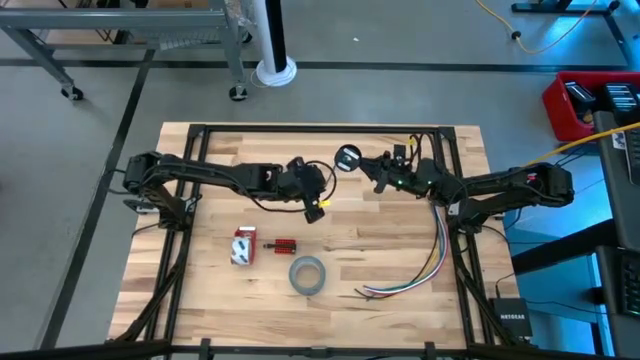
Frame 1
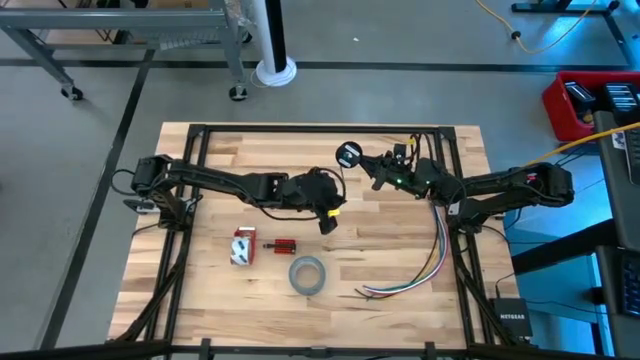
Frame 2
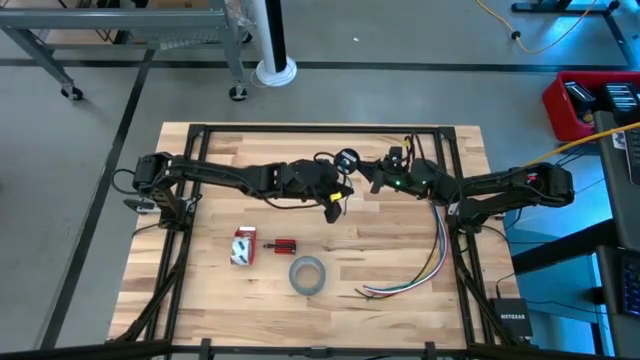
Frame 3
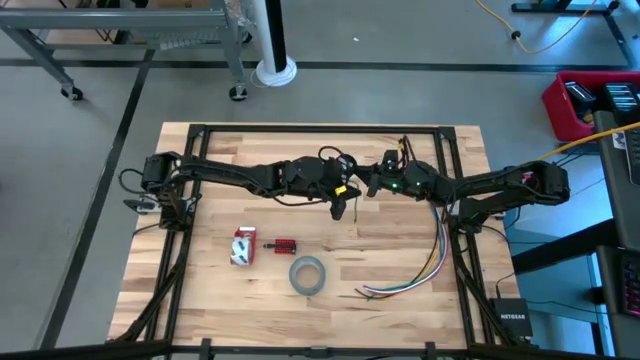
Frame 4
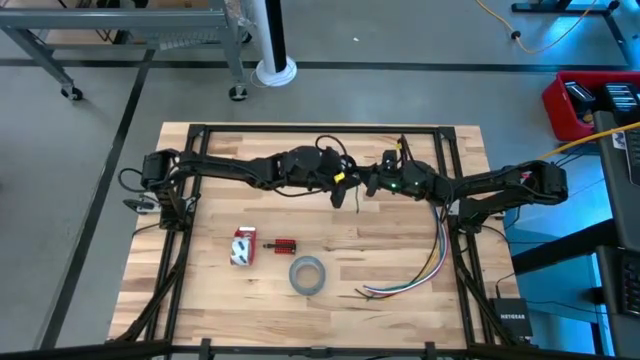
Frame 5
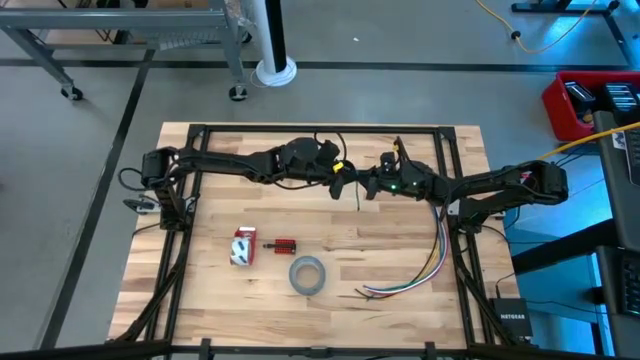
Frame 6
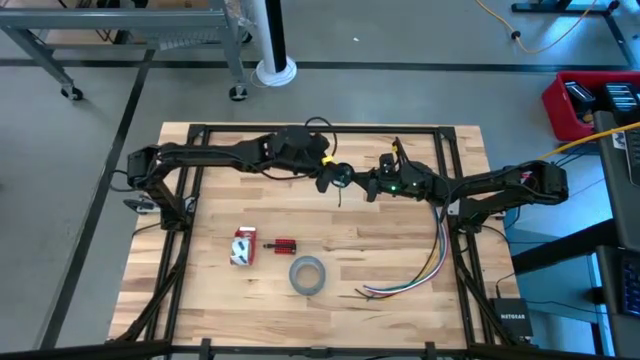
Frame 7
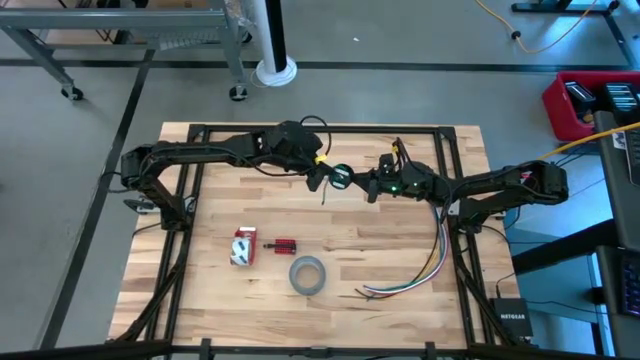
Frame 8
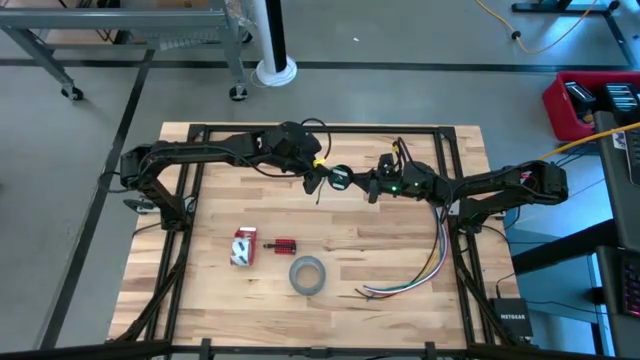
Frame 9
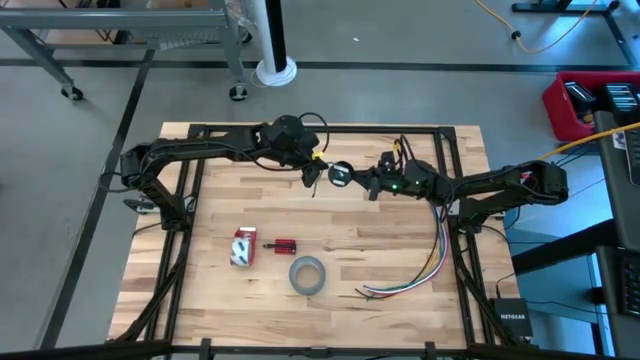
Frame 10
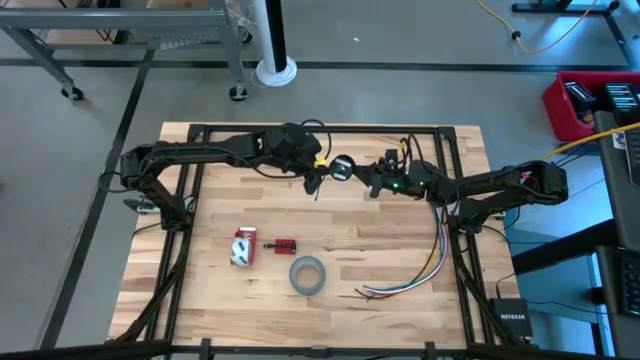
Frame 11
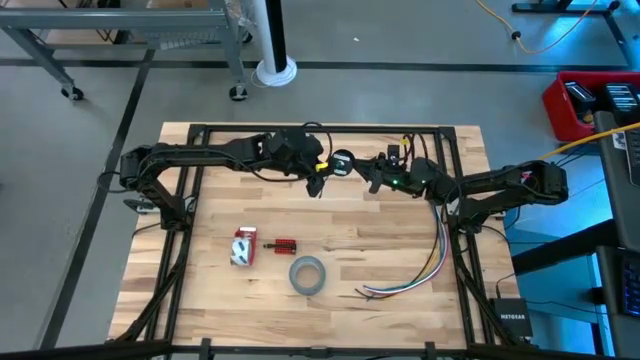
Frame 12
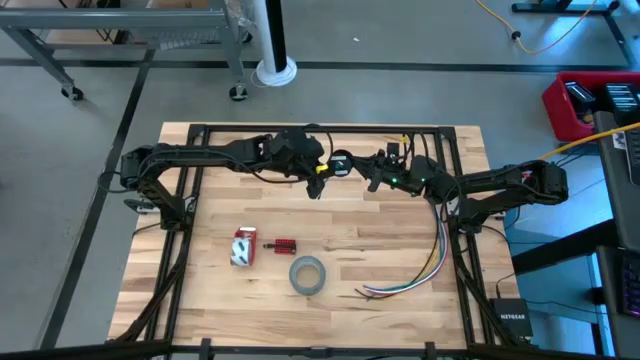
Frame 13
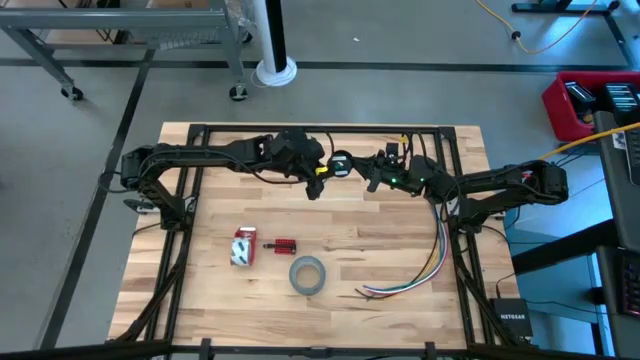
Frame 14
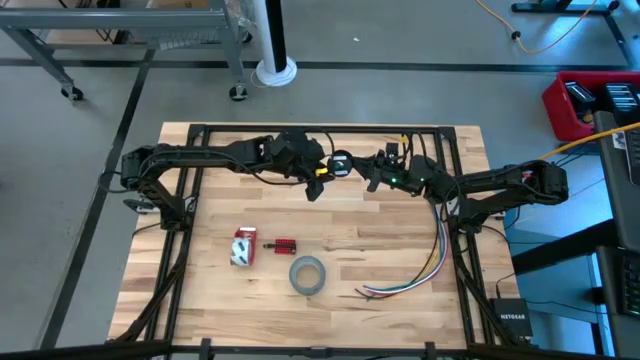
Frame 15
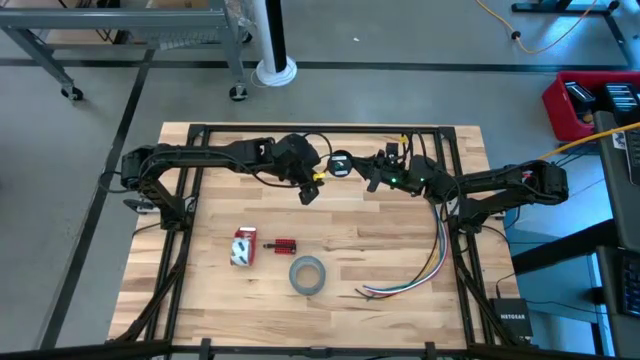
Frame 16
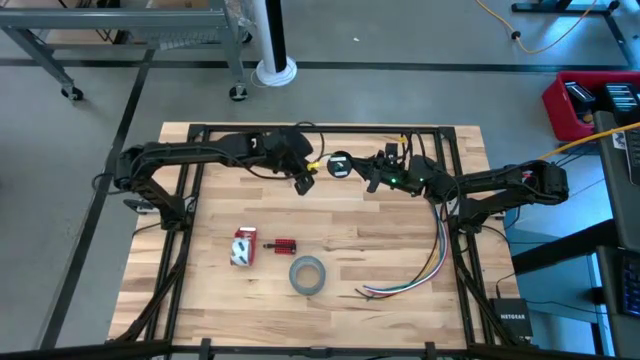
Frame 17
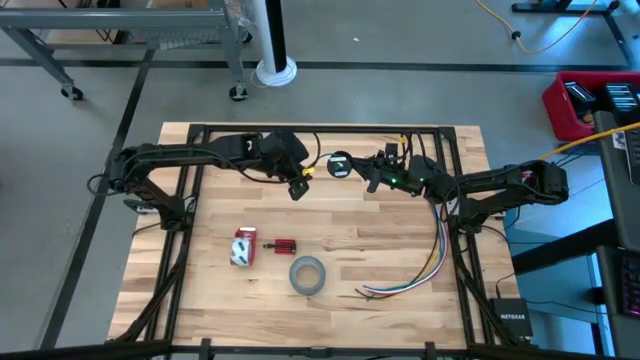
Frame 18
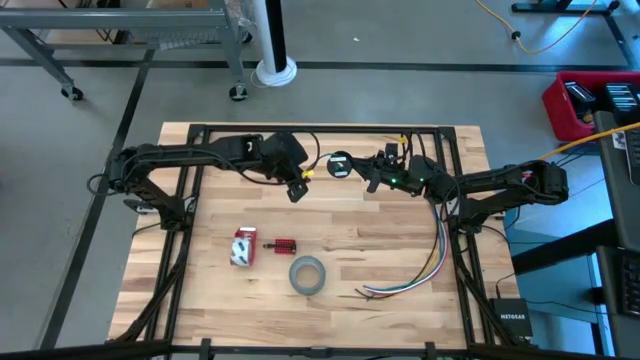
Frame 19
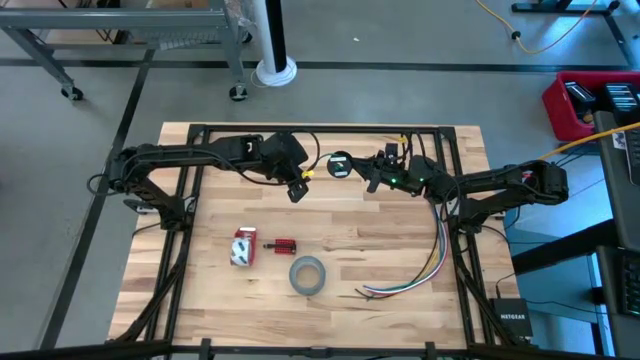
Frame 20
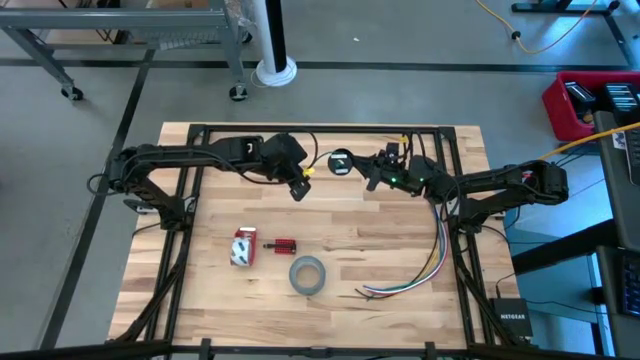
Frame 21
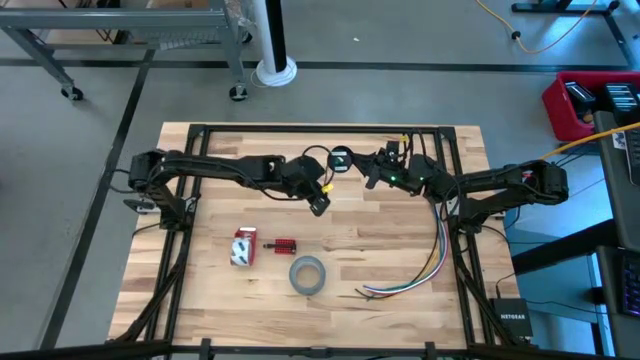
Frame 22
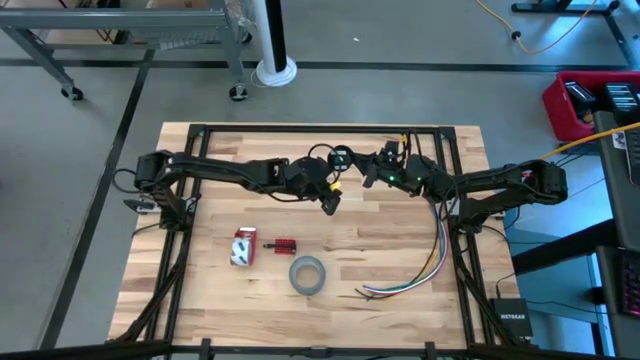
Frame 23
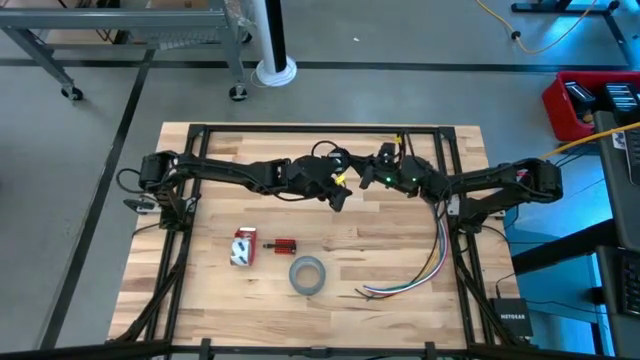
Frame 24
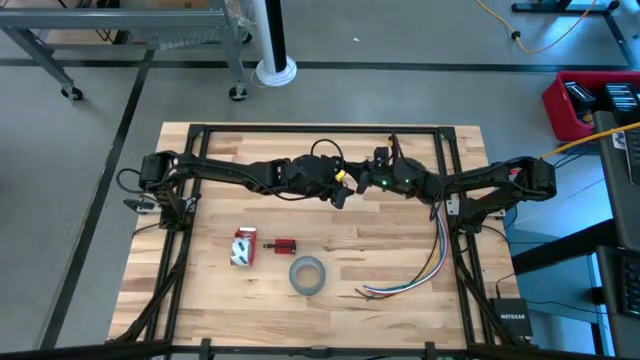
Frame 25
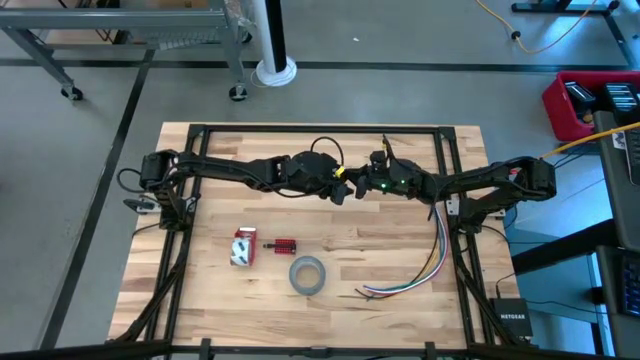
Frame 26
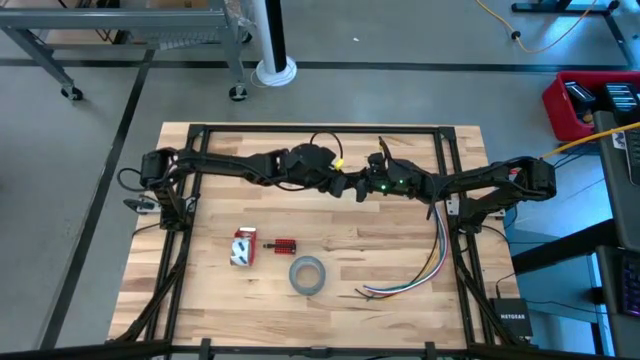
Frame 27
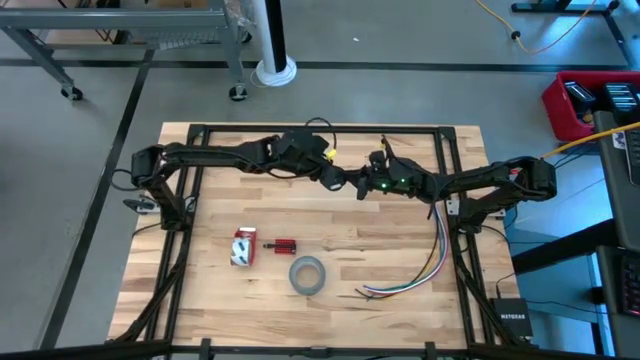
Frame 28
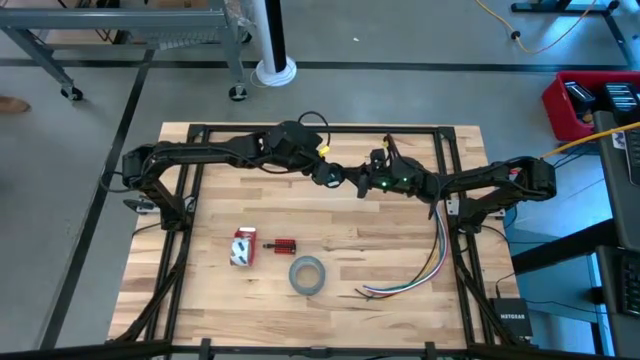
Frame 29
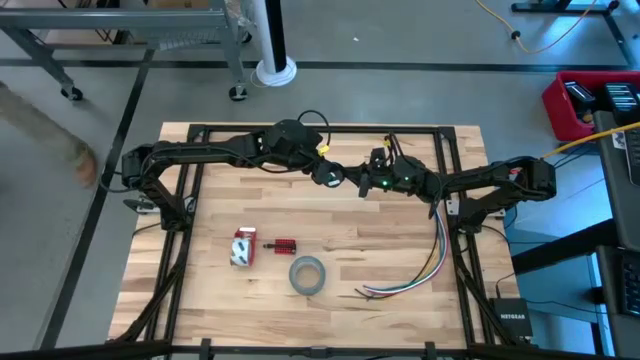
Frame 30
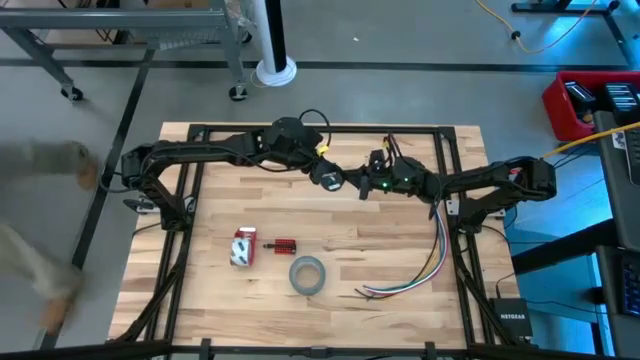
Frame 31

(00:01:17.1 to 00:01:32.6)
Task: Coil cords
Coil the green wire onto the spool

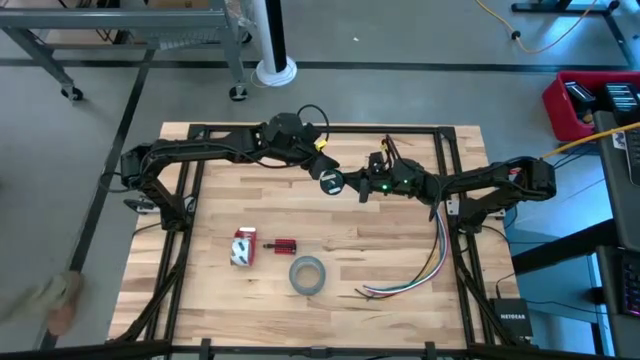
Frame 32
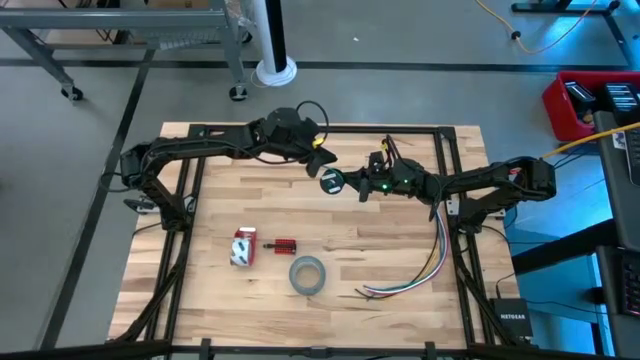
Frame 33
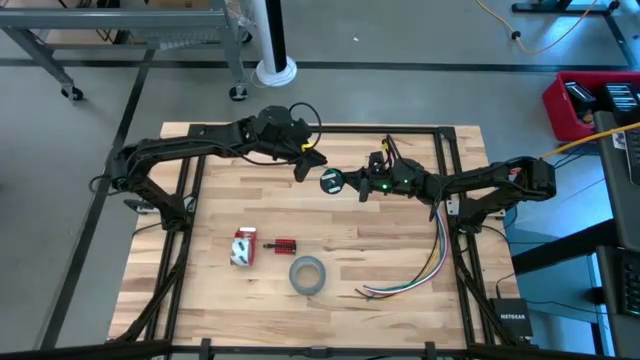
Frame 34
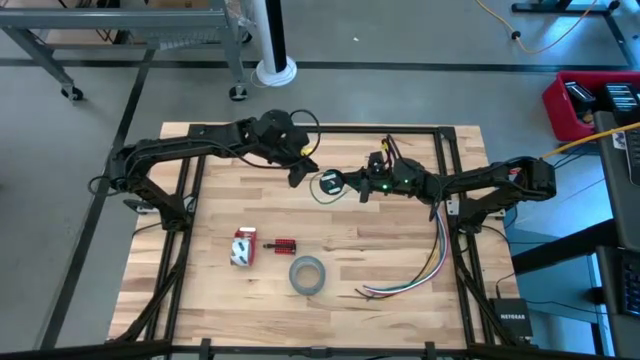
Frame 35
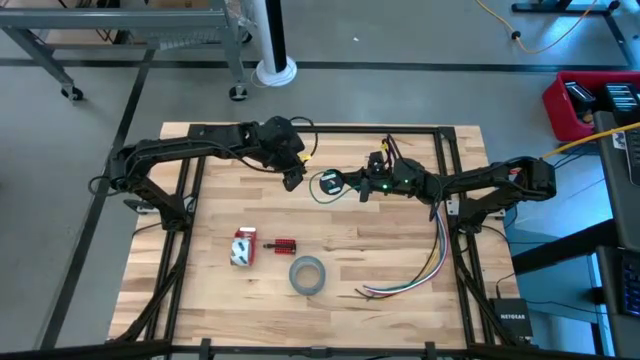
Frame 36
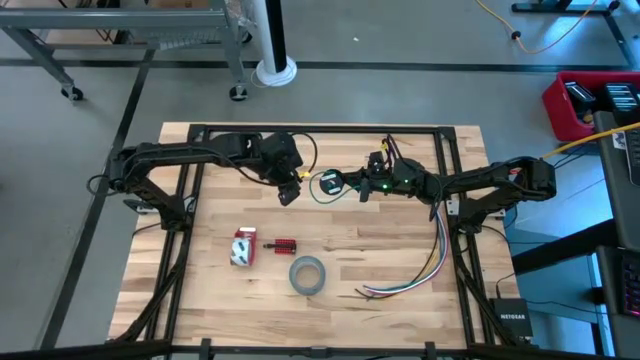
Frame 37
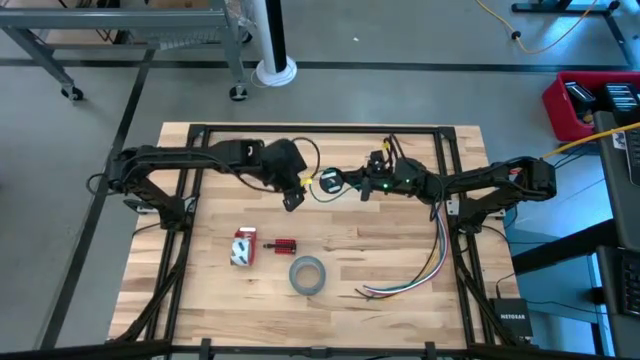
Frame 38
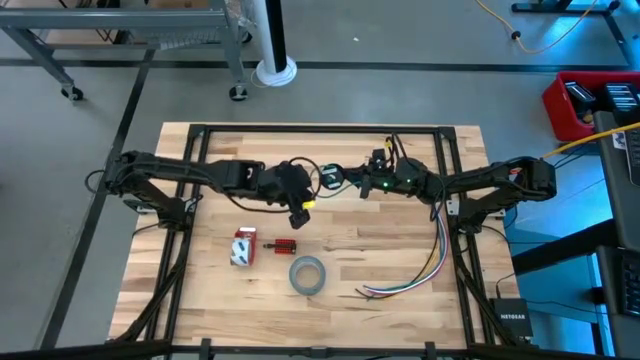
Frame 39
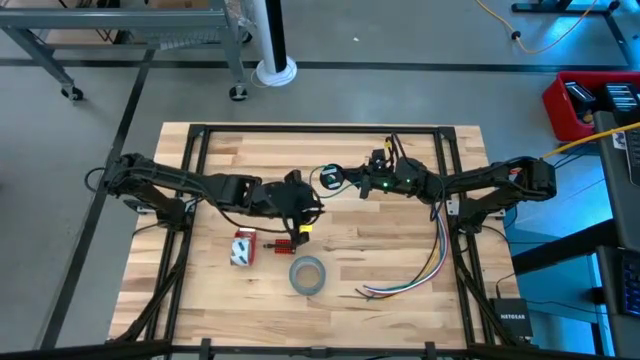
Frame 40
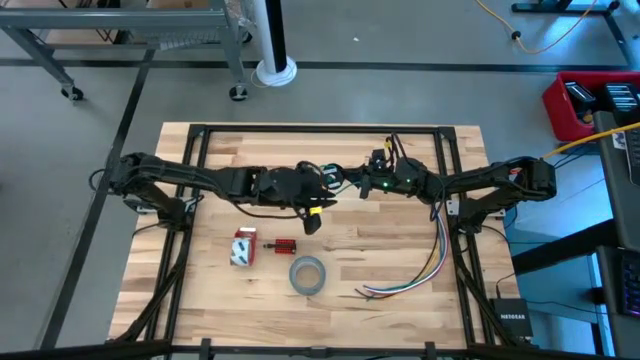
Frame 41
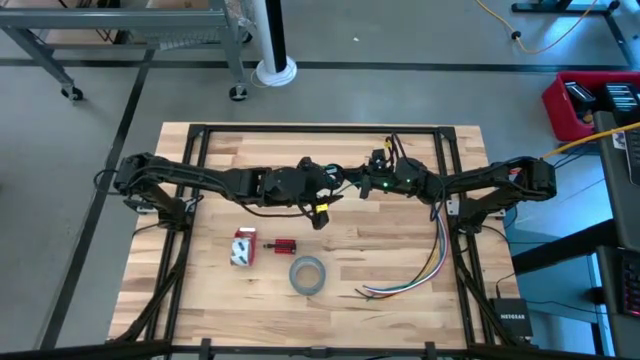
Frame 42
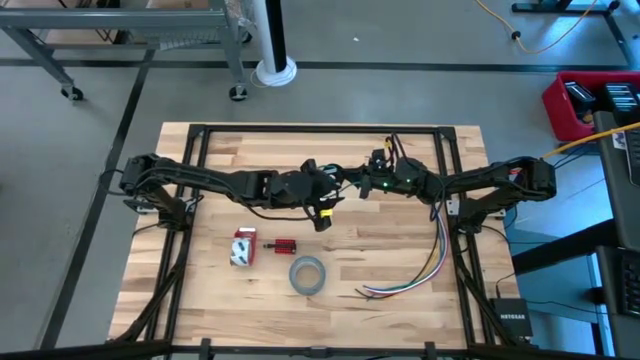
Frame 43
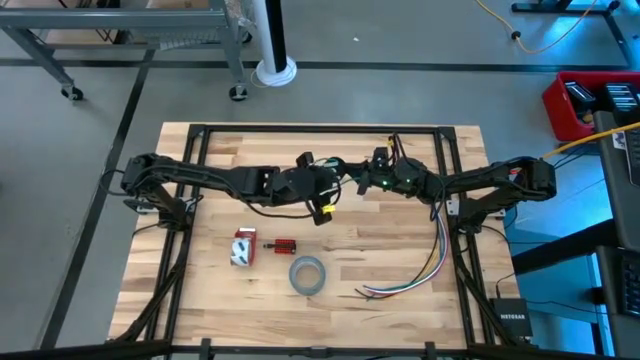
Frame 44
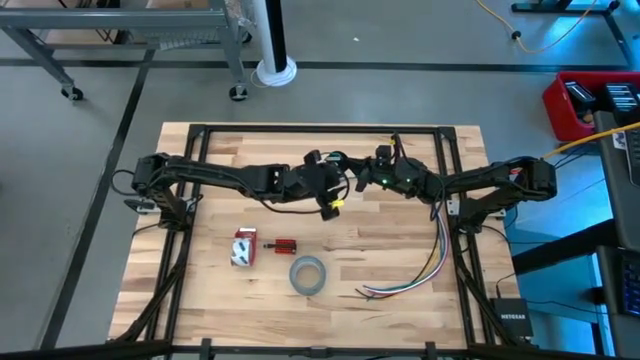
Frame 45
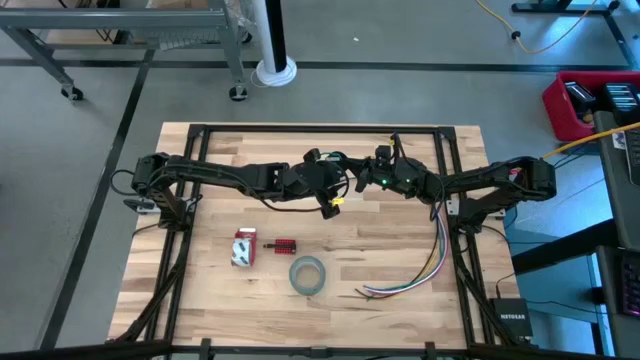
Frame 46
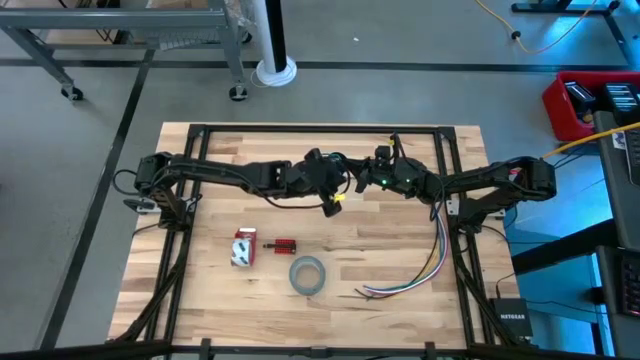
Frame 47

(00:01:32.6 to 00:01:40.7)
Coil the green wire onto the spool
